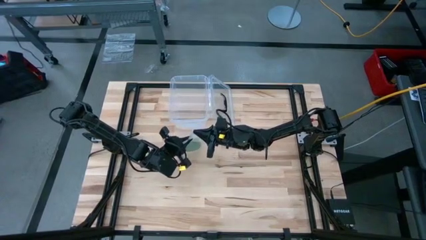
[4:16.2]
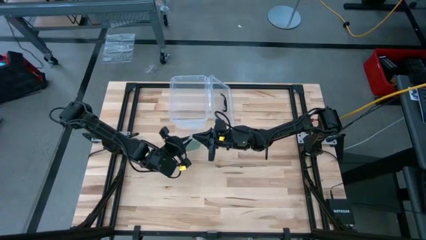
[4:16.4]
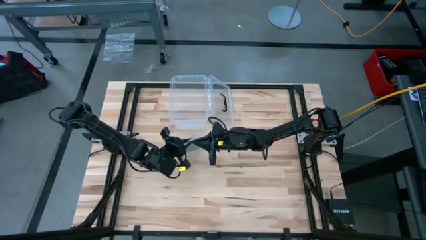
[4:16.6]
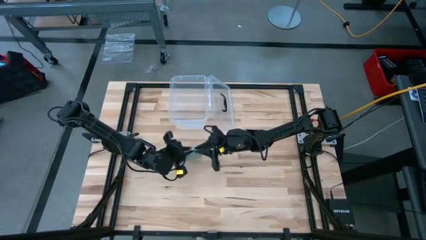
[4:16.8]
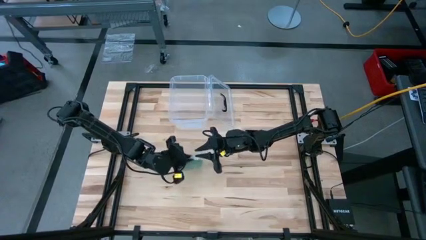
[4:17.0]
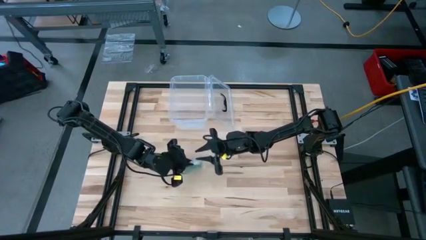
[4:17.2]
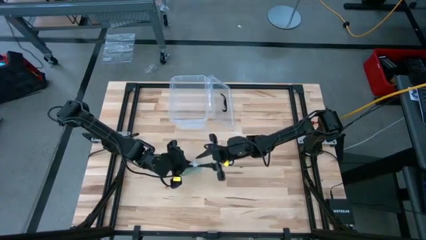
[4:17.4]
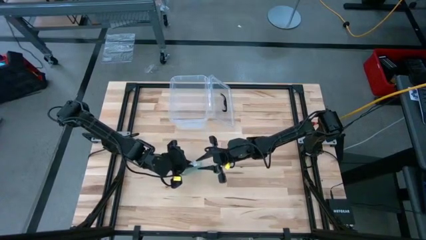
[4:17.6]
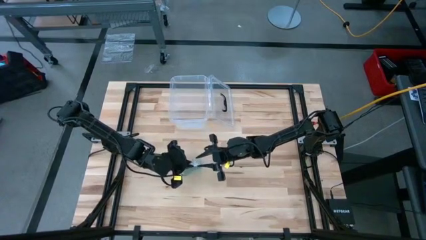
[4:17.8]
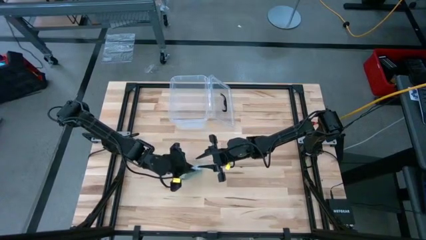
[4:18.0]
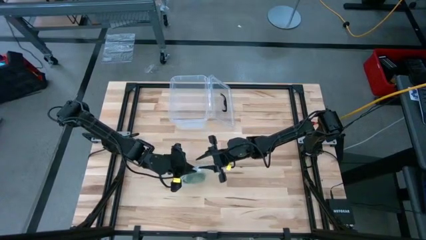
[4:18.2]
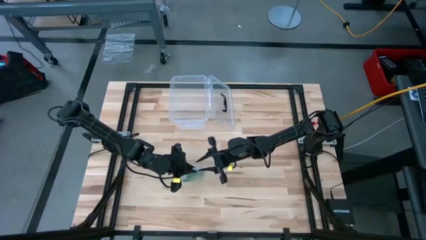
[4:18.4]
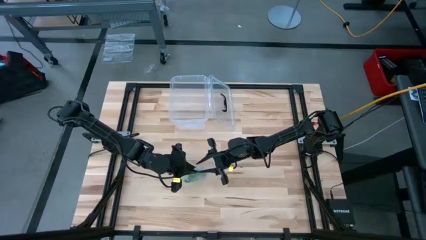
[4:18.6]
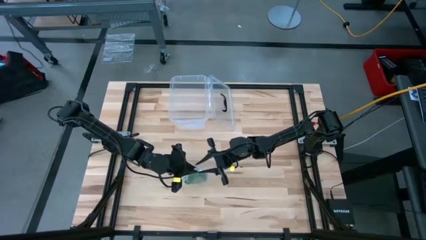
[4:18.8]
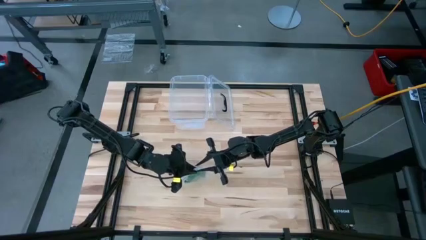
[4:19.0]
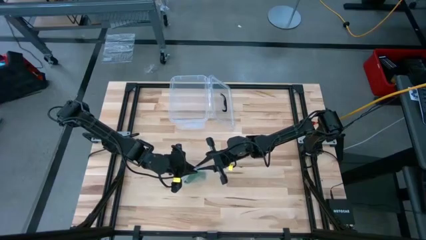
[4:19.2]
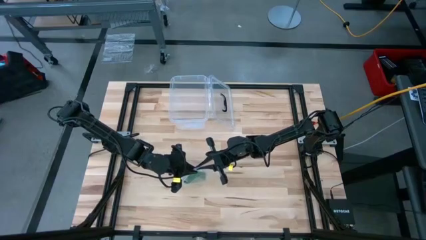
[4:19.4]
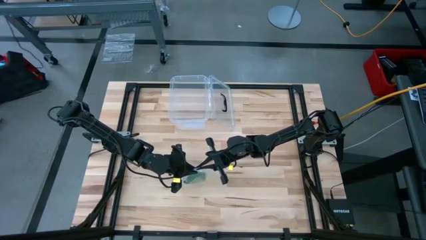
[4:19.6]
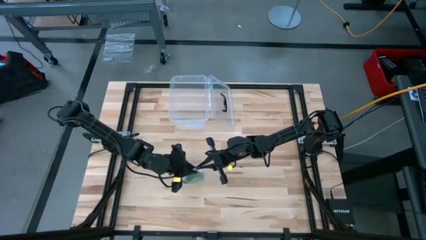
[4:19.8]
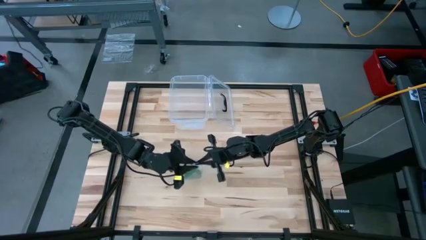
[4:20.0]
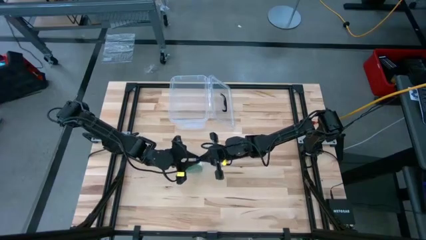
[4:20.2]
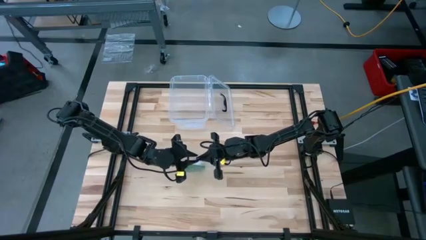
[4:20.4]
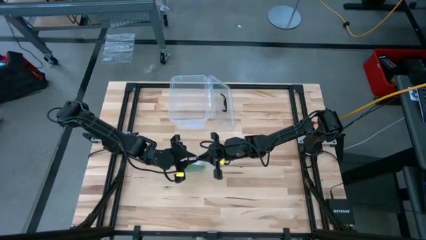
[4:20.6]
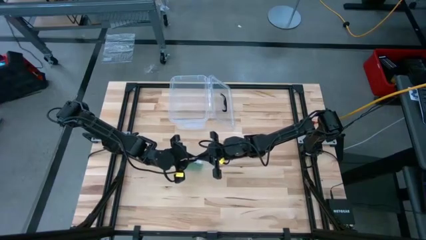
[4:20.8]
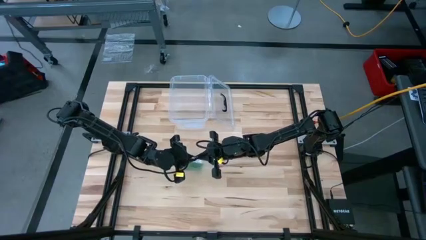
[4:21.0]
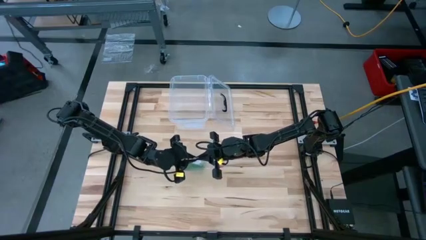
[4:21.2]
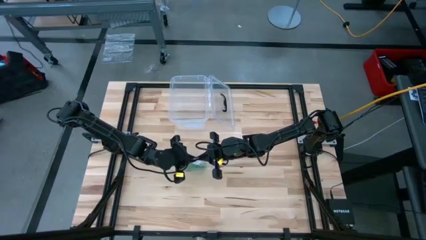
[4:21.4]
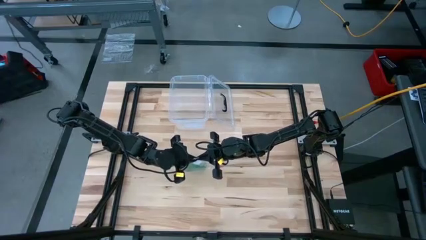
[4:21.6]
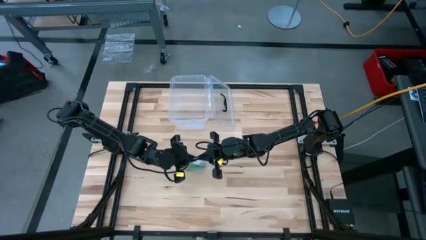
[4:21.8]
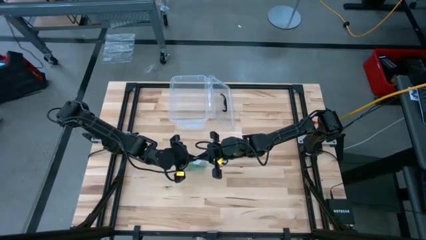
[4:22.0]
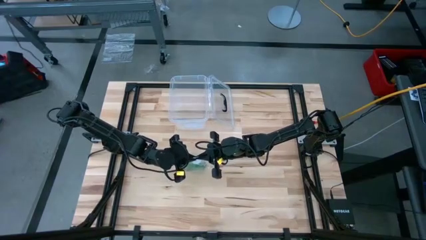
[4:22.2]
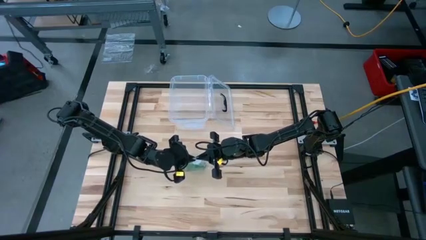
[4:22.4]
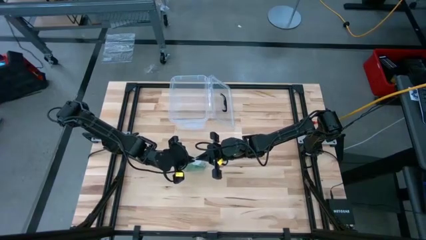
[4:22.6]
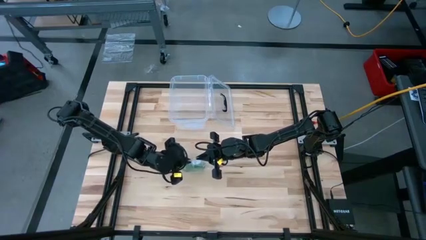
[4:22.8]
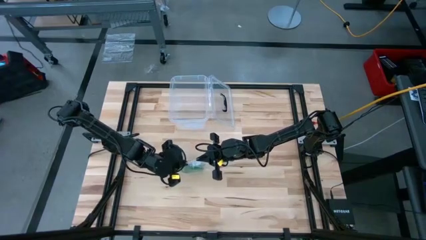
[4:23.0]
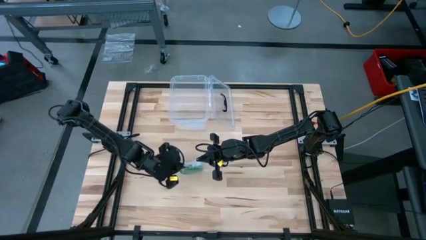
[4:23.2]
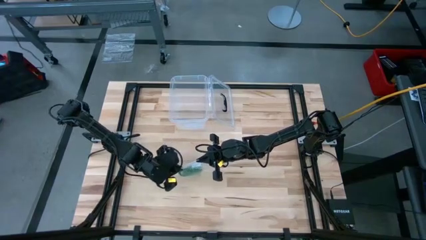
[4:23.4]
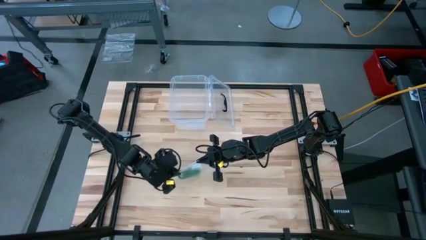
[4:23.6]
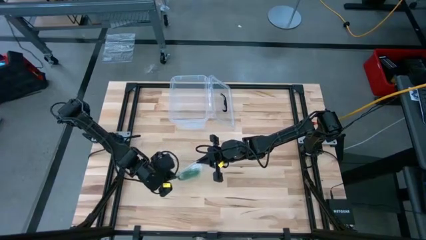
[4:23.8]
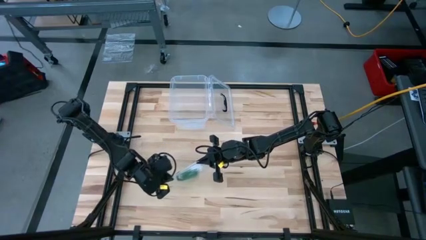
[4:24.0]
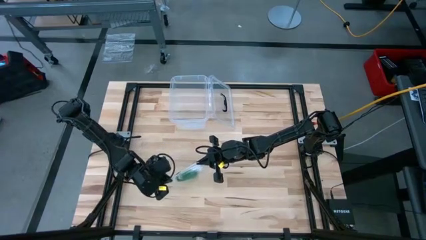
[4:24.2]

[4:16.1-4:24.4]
Task: Roll bandage
Close the transparent zip bag

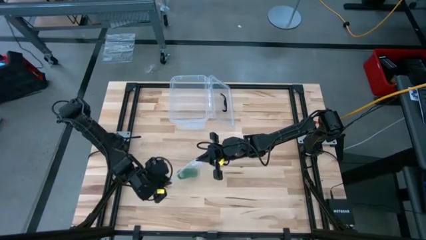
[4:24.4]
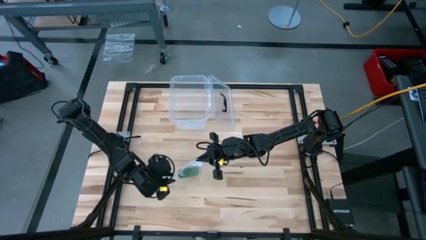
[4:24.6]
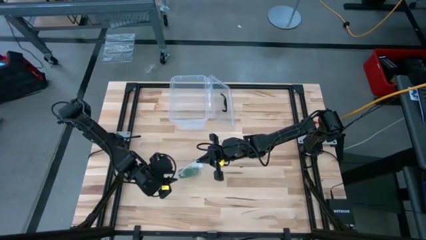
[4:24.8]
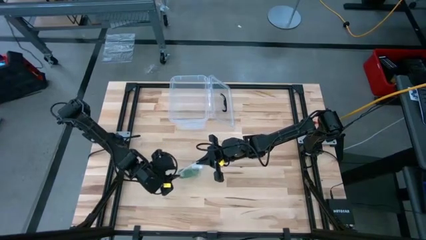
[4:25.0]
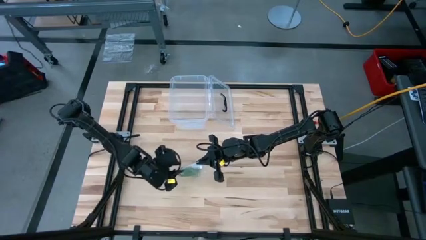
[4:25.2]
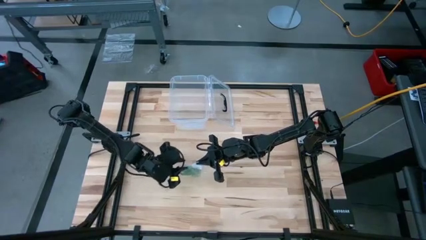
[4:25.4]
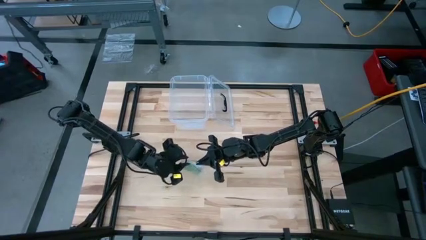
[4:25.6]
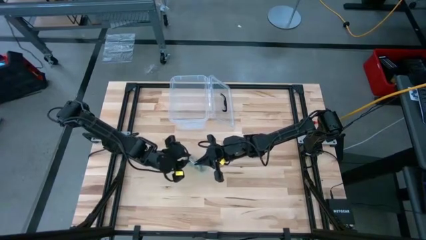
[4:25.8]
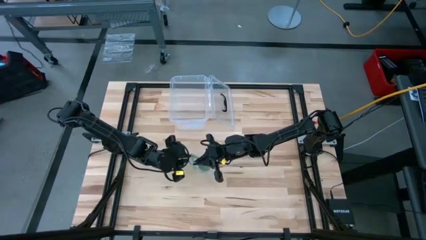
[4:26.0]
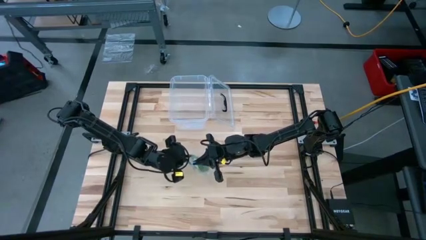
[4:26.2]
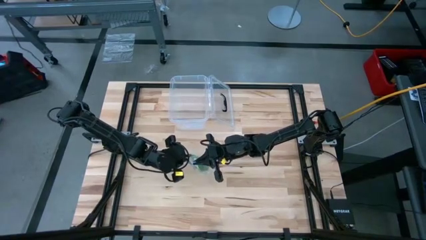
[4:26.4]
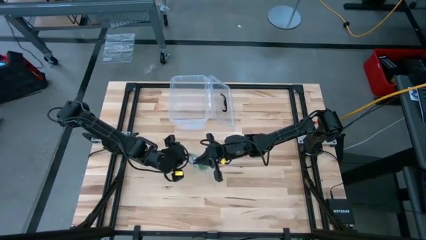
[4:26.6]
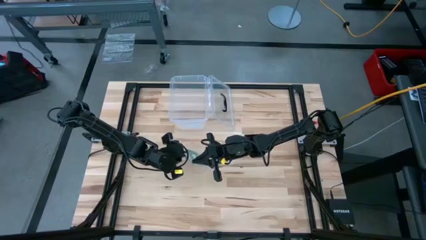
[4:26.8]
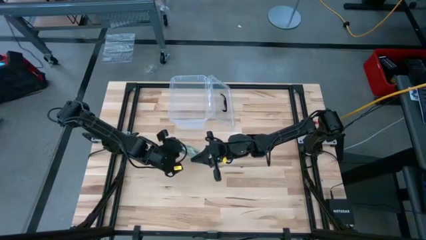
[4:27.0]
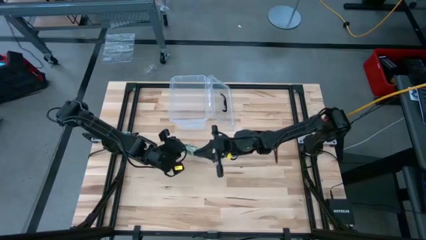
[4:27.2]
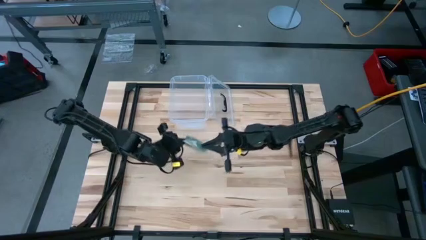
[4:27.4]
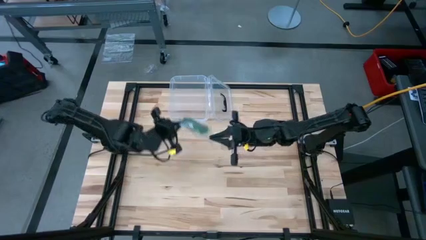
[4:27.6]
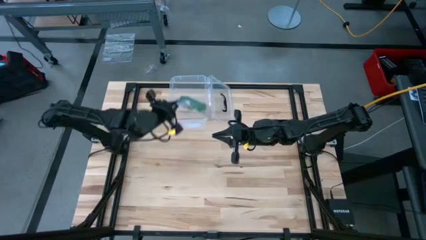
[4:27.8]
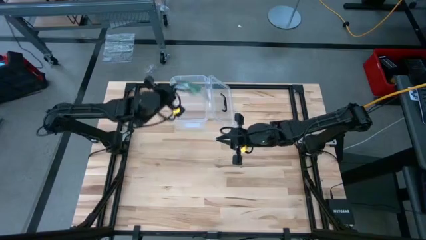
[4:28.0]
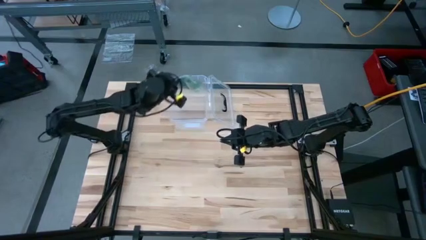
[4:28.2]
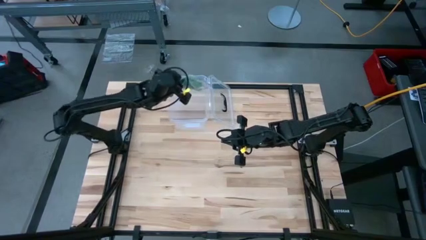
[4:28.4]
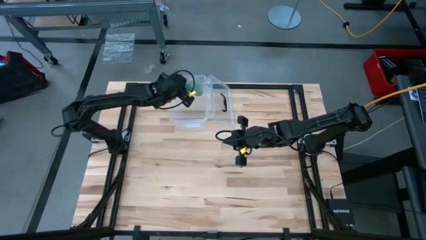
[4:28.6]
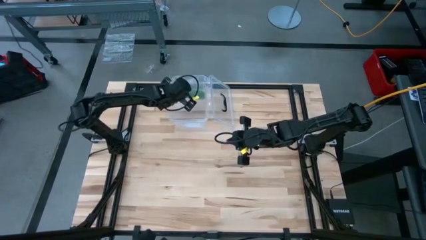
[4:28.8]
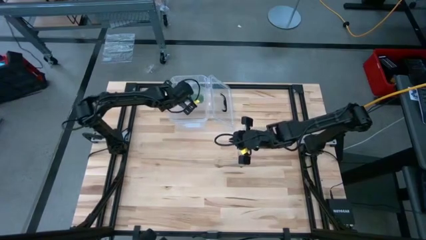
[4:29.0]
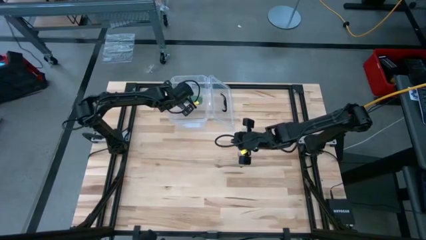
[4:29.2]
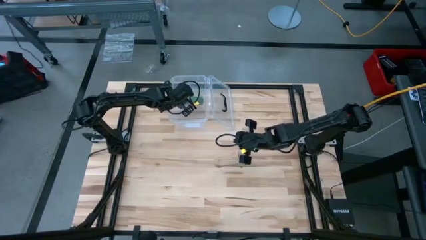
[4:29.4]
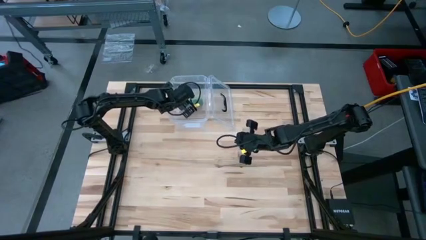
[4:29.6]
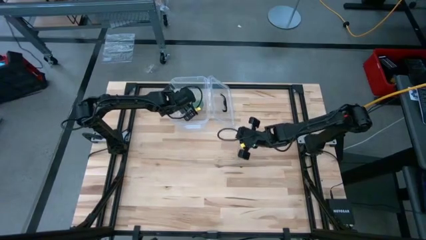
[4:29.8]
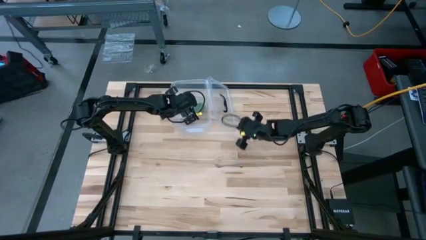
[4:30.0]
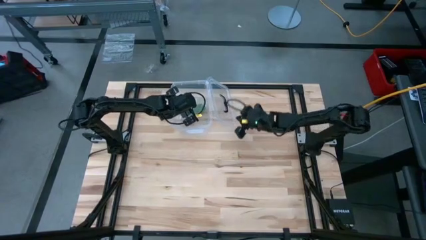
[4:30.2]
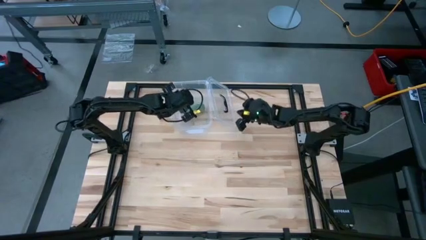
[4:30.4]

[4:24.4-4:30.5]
Put the transparent zip bag into the transparent bin

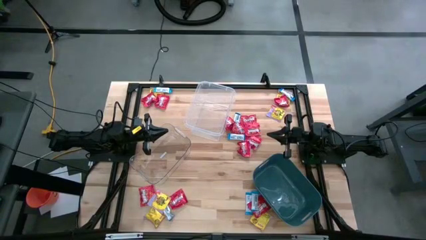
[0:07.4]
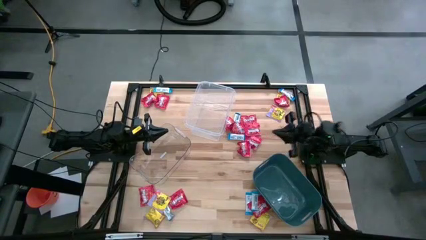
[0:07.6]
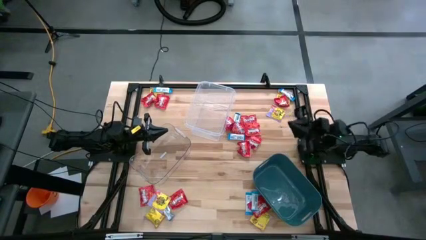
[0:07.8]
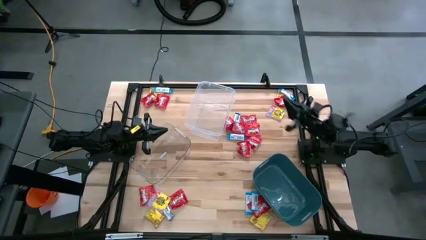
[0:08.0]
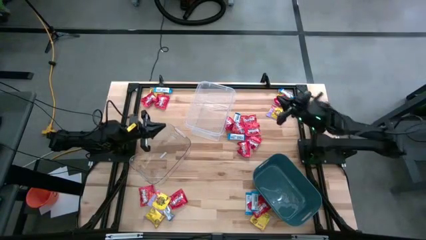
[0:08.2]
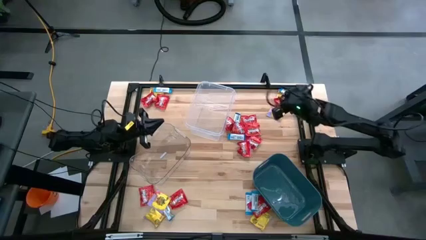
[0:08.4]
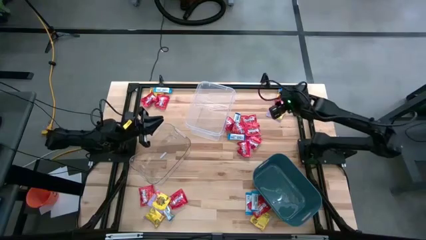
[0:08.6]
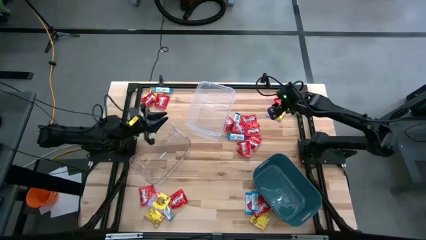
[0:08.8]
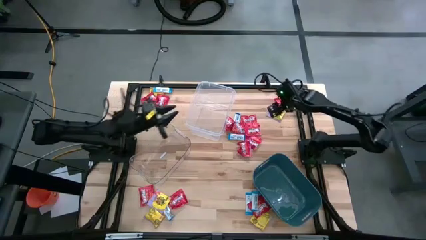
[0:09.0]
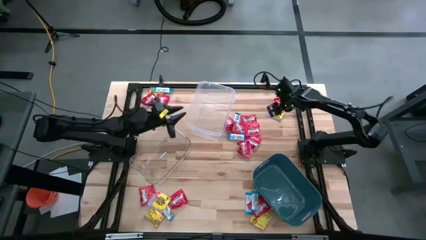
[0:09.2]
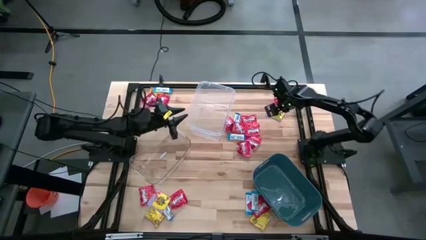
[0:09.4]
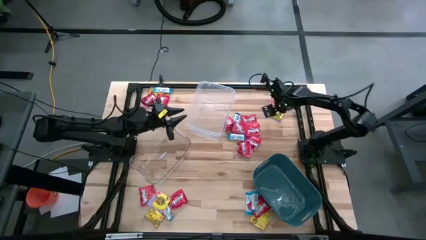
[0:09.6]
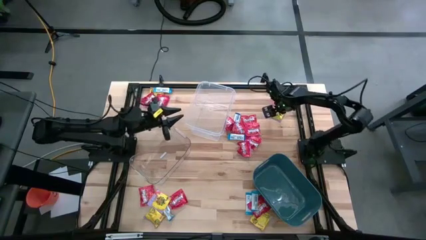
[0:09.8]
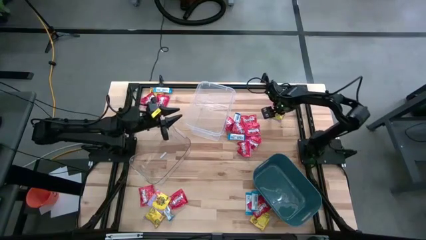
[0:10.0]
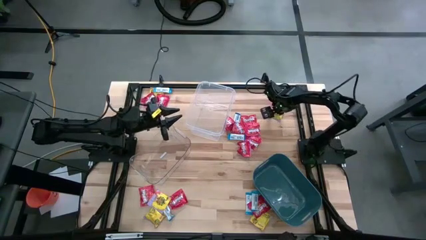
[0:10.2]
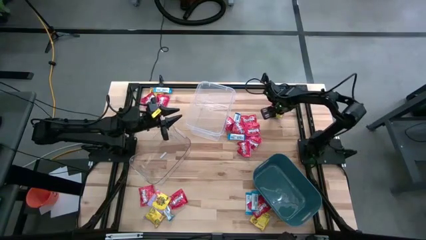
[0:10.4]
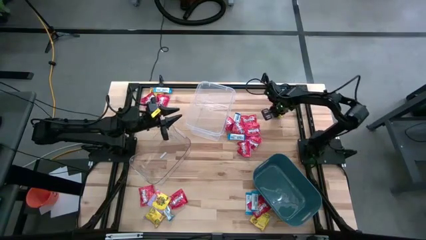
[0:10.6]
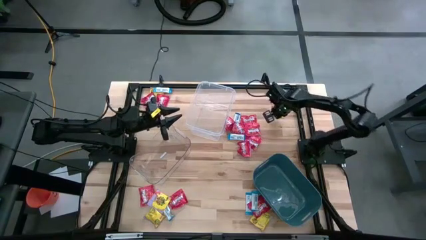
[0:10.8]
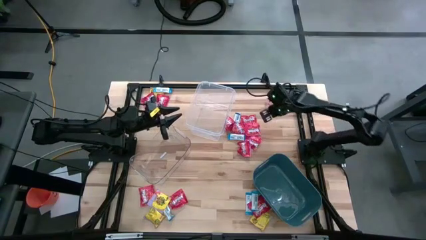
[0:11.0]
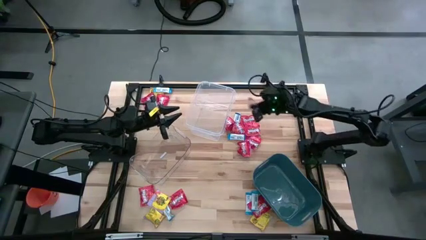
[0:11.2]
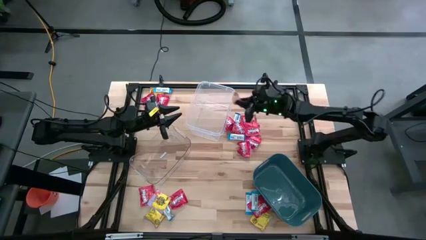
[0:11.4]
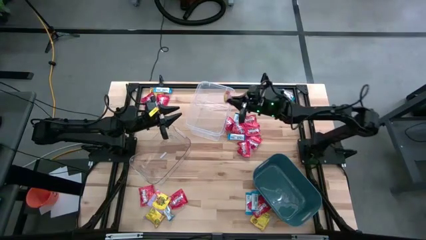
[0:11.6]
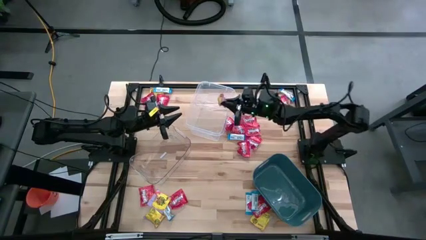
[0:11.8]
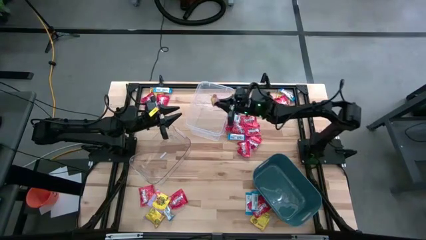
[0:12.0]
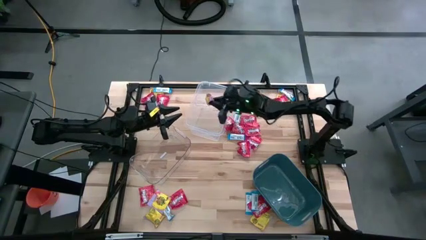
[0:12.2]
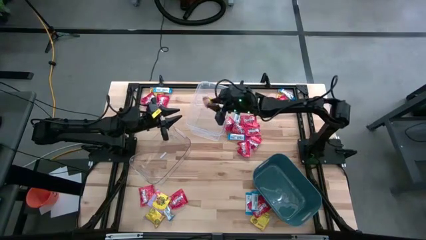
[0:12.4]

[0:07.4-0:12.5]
Task: Sort candy
Put the yellow candy into the transparent container
